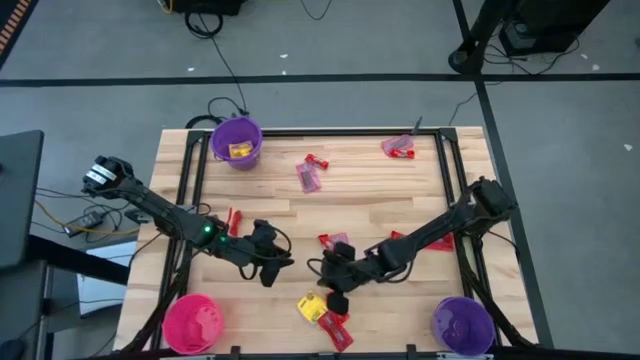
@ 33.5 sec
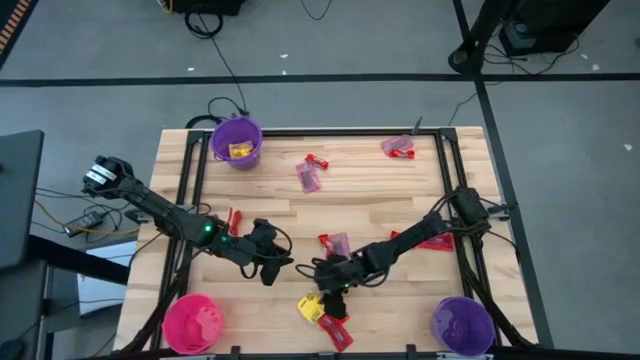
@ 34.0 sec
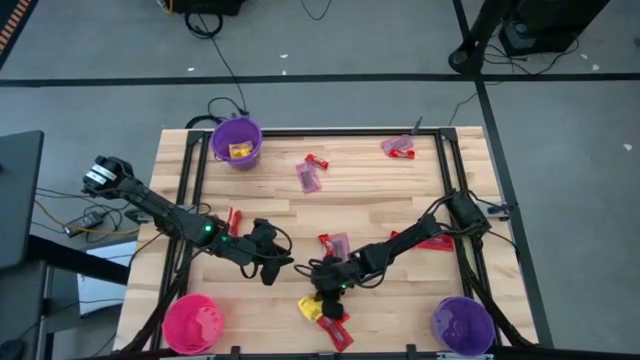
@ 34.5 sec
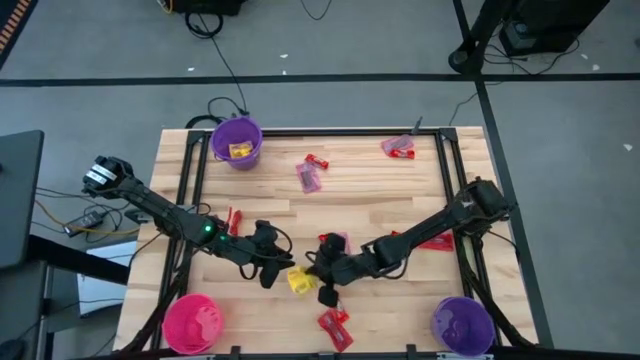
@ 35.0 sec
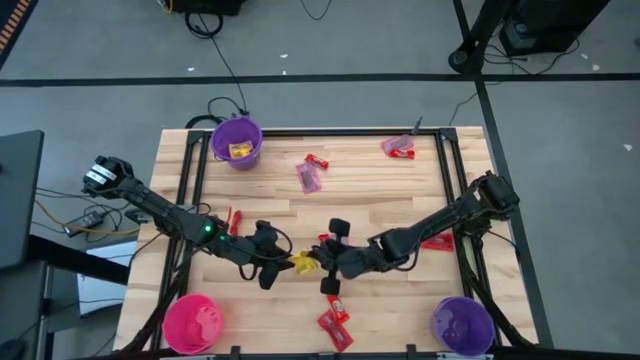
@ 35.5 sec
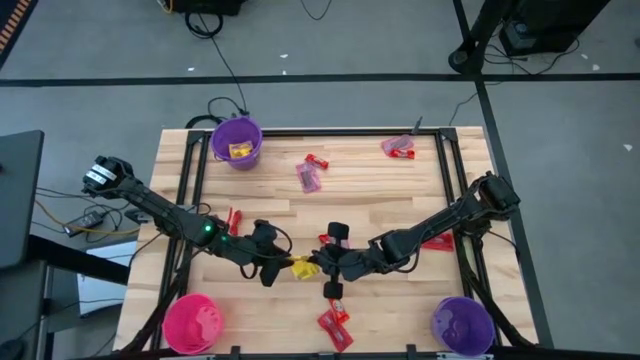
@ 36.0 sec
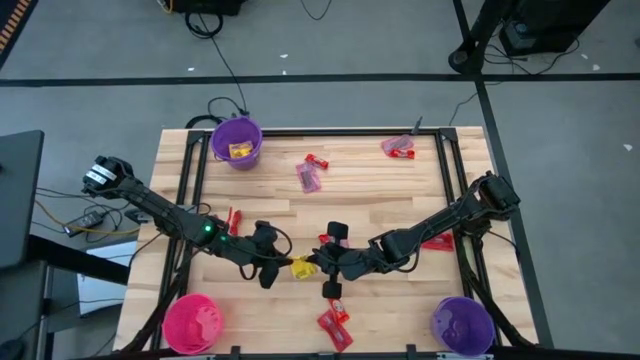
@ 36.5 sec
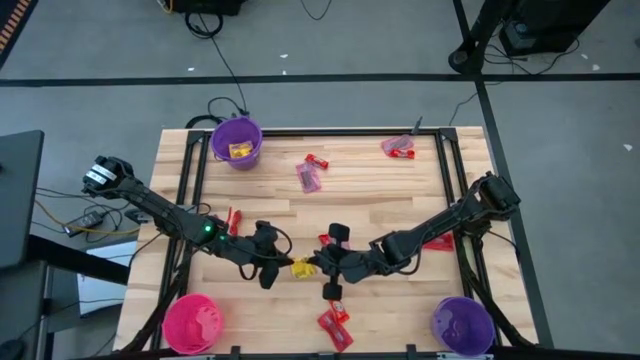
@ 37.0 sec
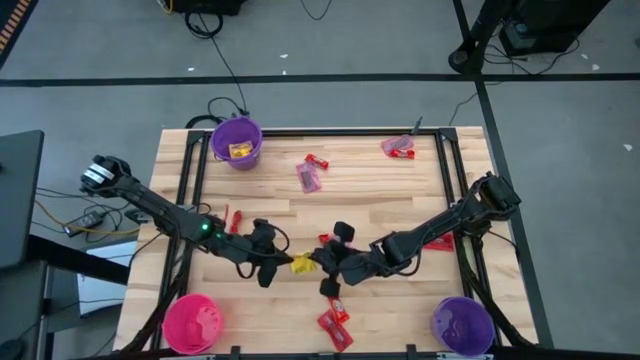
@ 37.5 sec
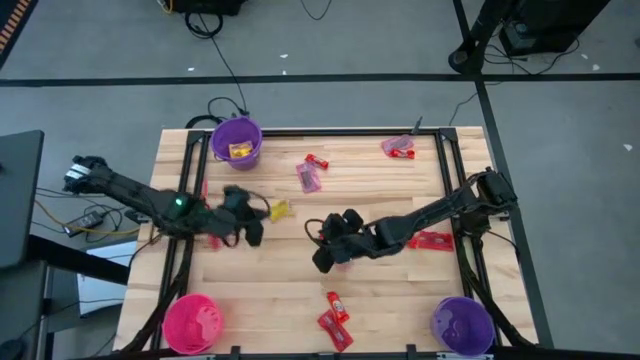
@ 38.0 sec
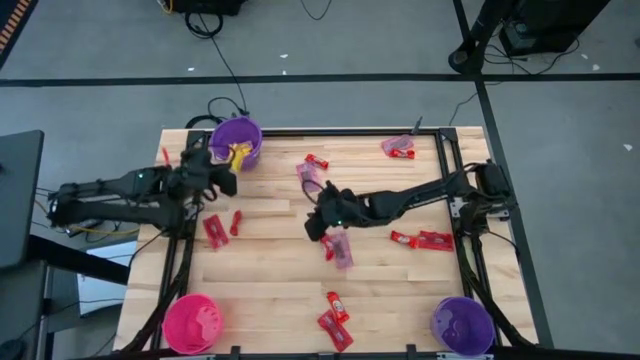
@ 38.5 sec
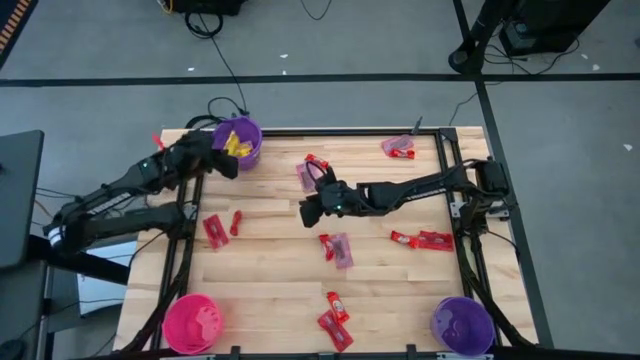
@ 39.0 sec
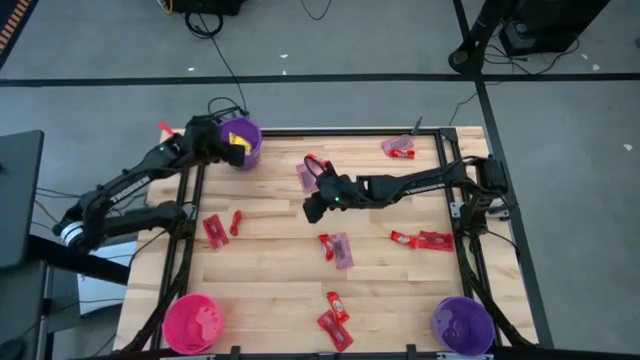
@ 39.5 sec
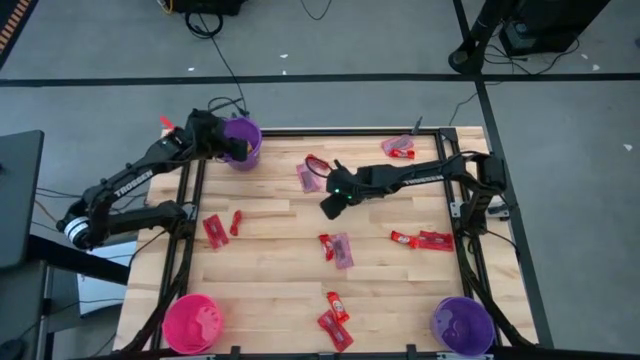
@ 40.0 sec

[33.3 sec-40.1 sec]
Task: Sort candy by brand, put in halloween buckets
Put the yellow candy into the top purple bucket

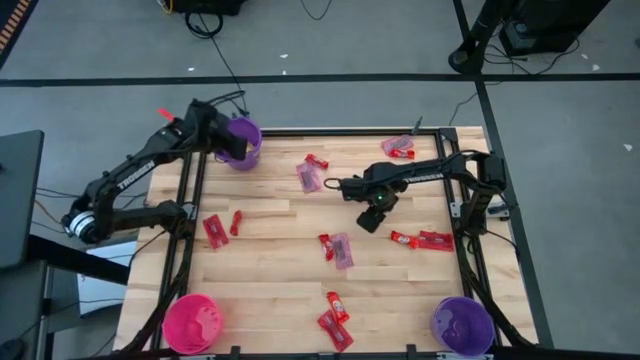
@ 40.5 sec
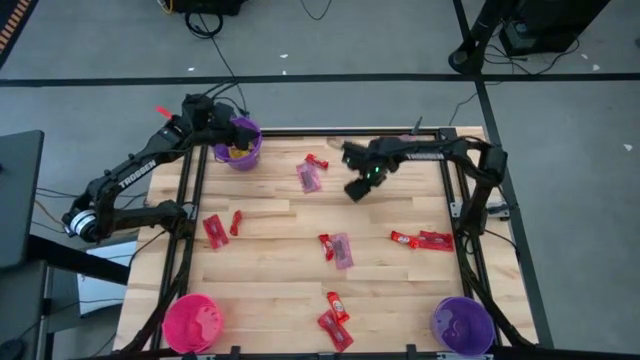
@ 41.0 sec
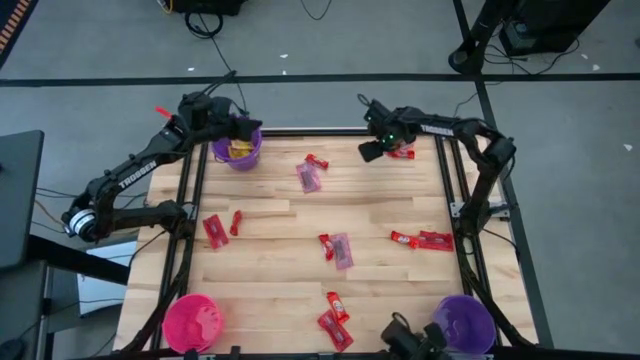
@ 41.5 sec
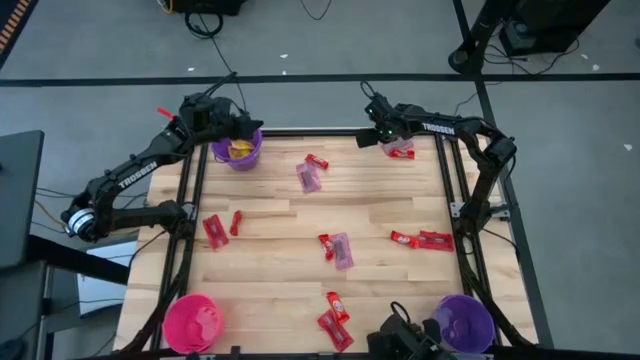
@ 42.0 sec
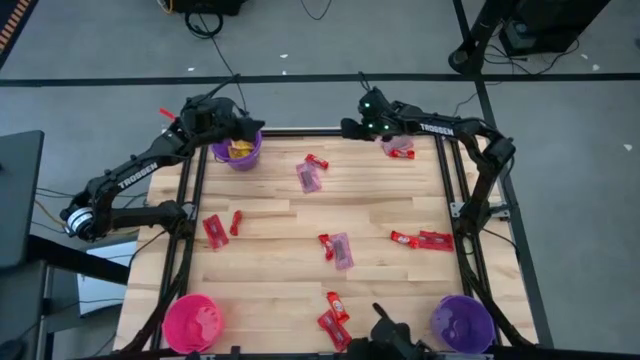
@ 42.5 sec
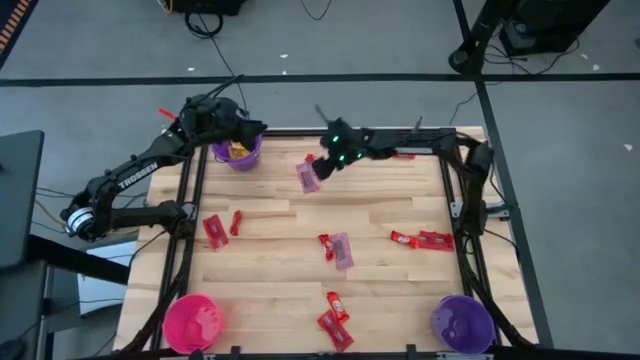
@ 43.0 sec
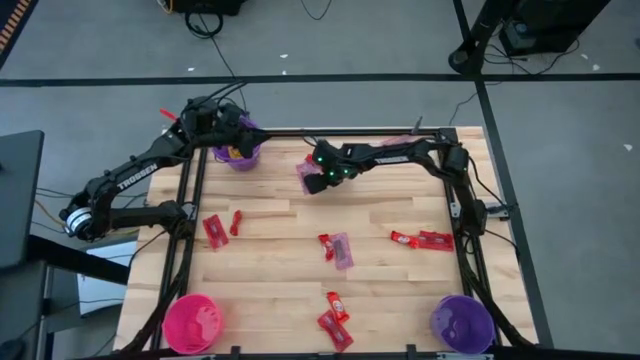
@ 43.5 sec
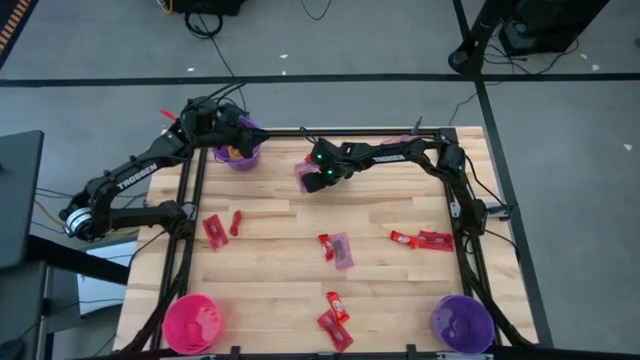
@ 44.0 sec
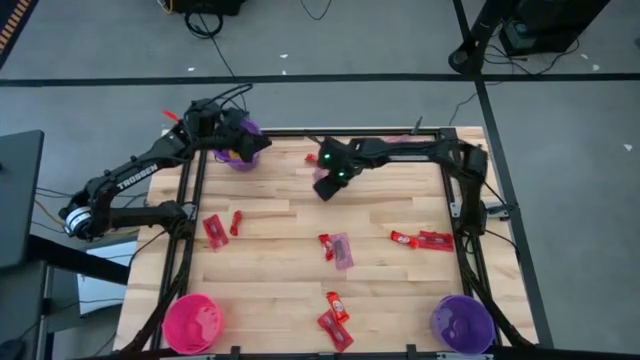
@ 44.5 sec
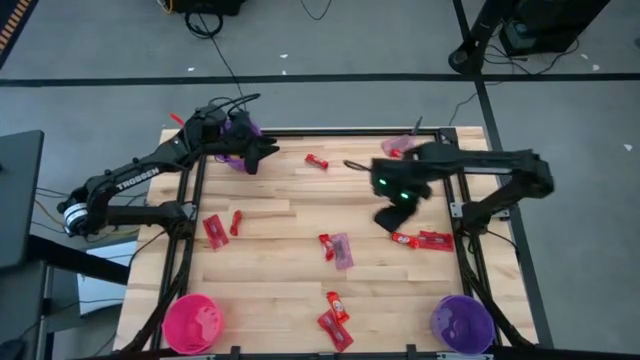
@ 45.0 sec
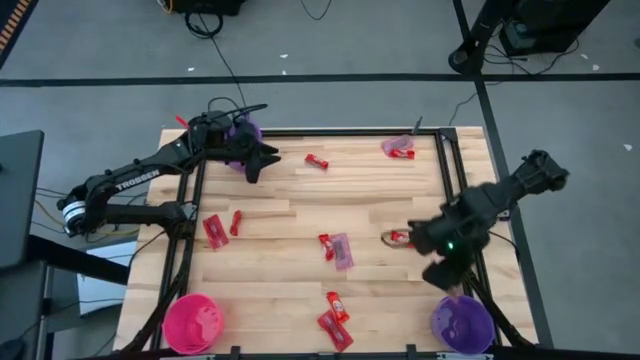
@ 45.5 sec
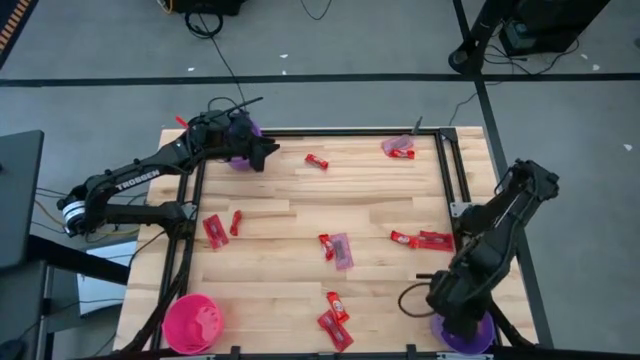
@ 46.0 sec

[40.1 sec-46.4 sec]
Put the red candy into the bottom purple bucket

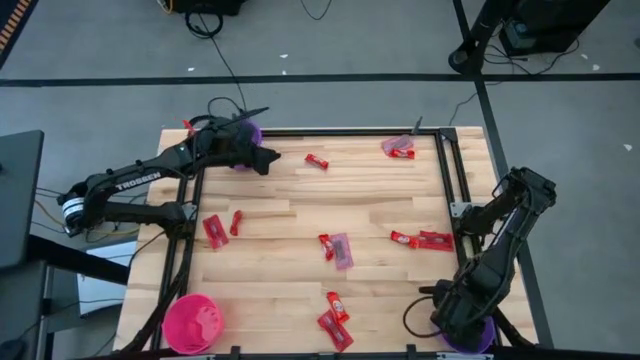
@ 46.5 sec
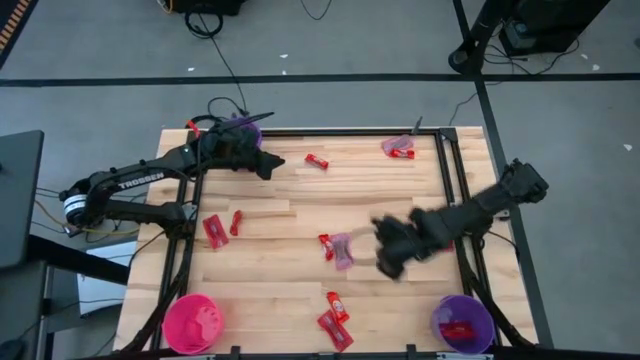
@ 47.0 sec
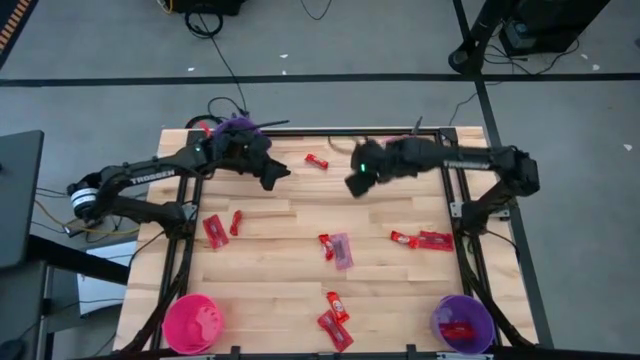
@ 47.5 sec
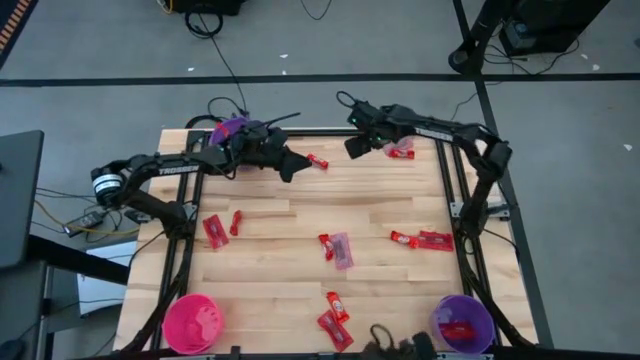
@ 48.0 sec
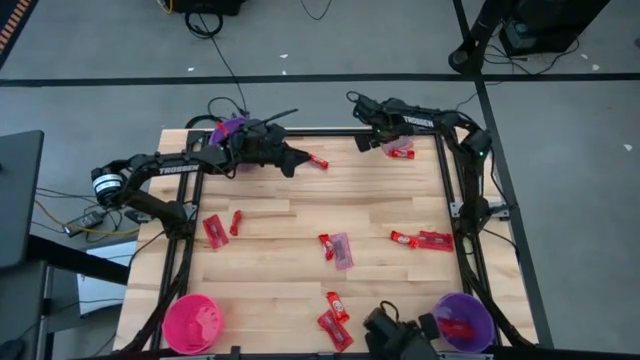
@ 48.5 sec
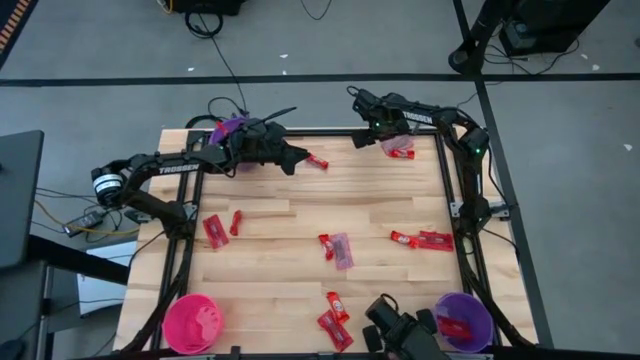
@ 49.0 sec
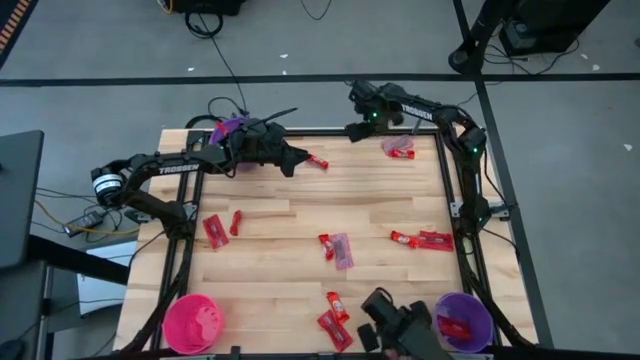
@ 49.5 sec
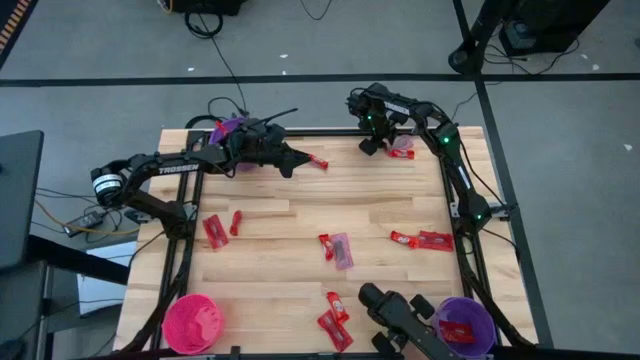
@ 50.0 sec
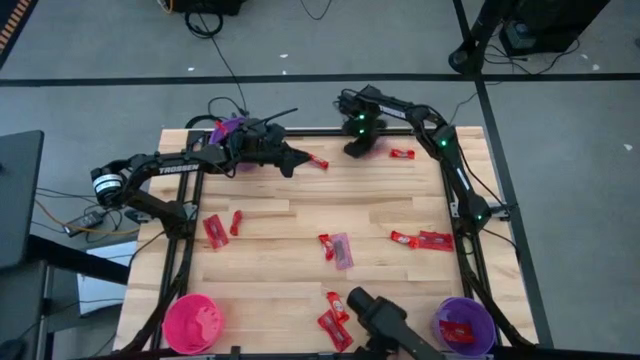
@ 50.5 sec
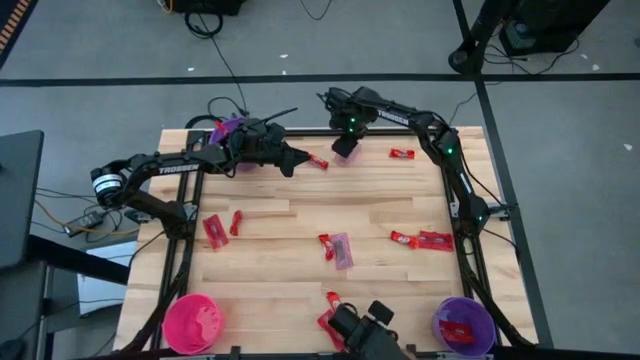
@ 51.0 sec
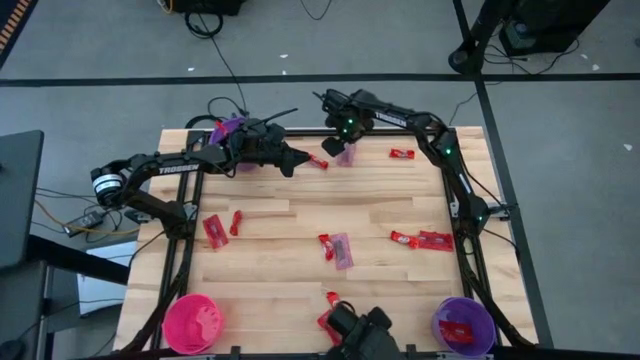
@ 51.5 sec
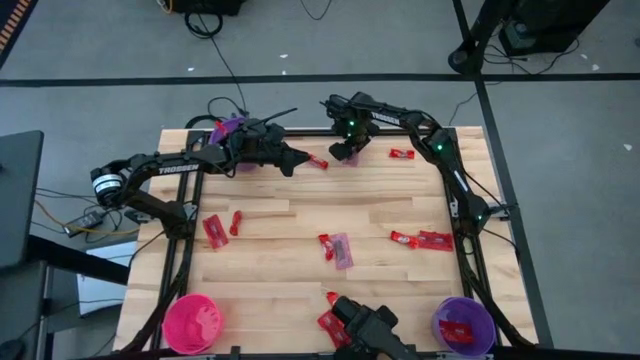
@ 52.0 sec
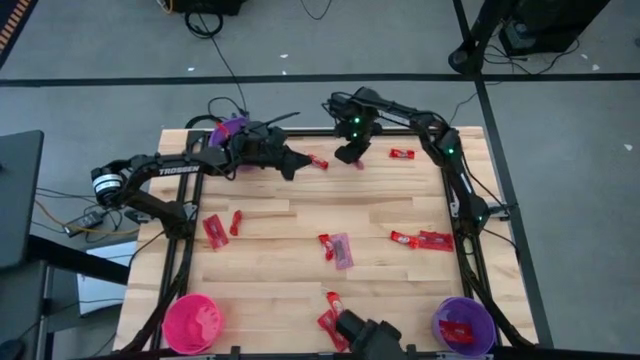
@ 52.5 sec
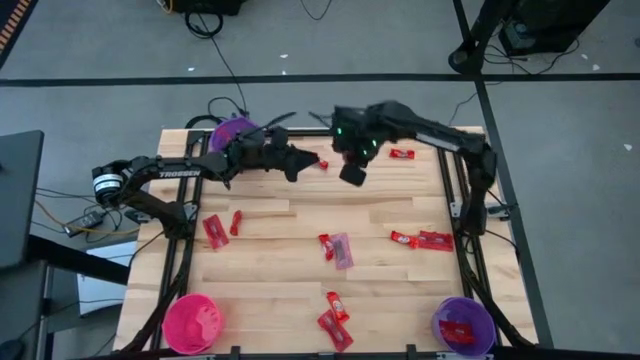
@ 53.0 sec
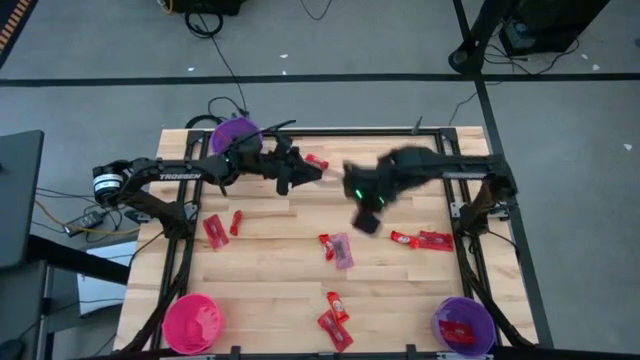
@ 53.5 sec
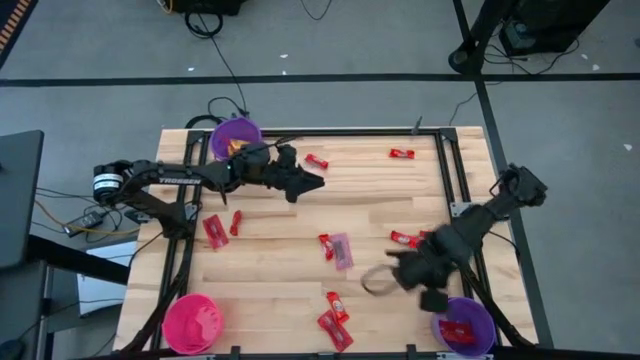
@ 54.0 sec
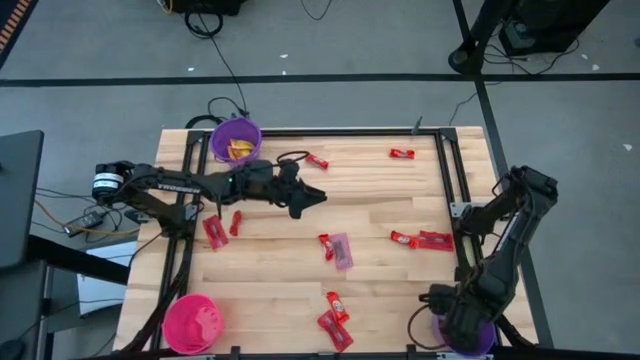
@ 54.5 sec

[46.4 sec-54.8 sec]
Put the red candy into the bottom purple bucket
